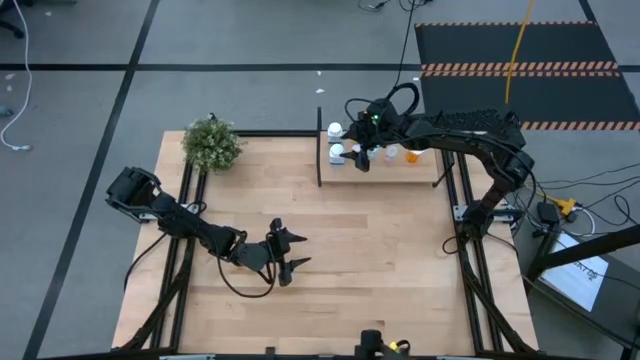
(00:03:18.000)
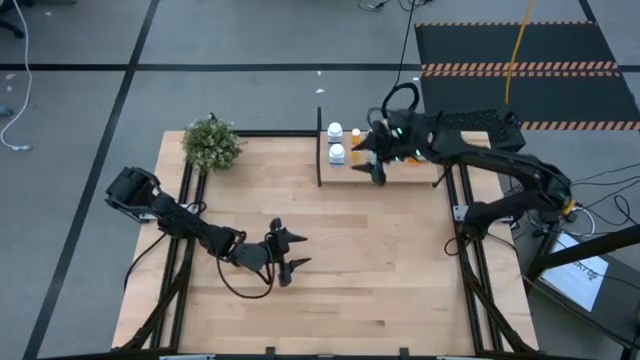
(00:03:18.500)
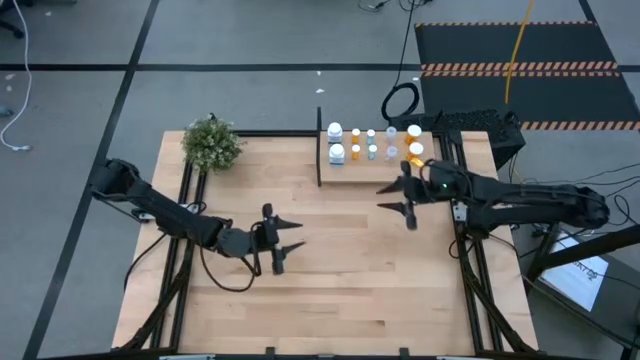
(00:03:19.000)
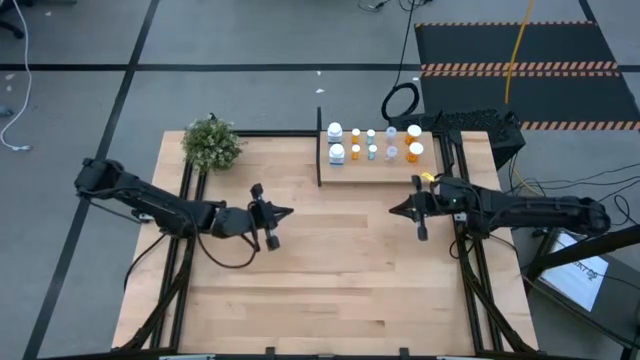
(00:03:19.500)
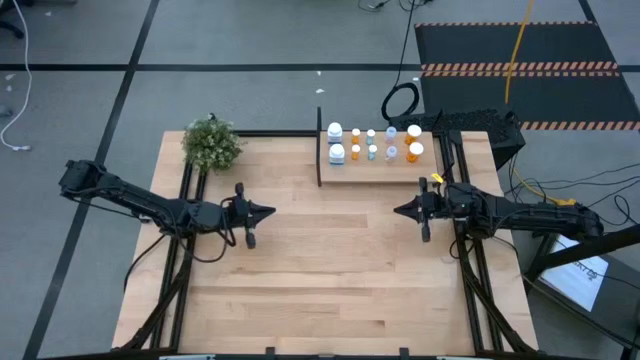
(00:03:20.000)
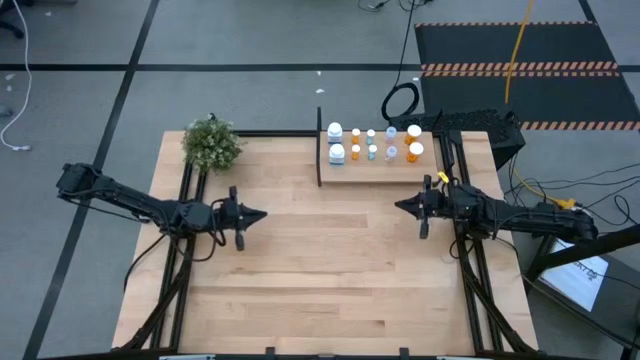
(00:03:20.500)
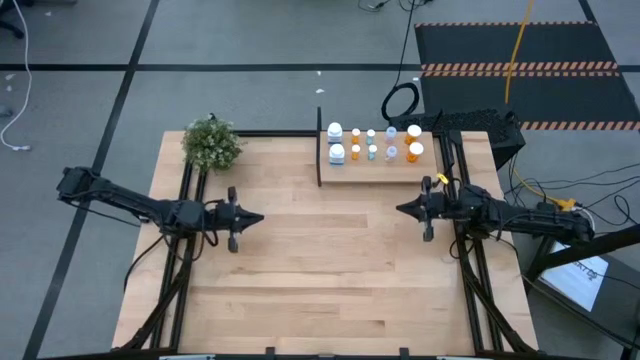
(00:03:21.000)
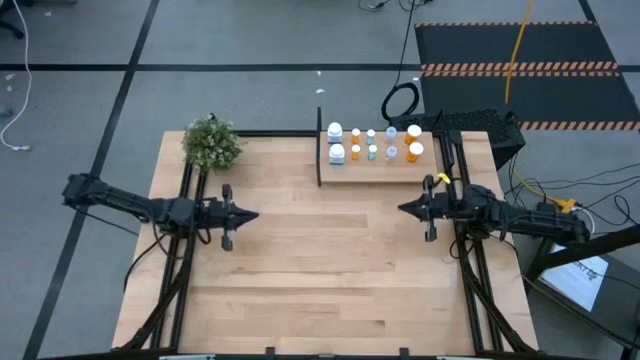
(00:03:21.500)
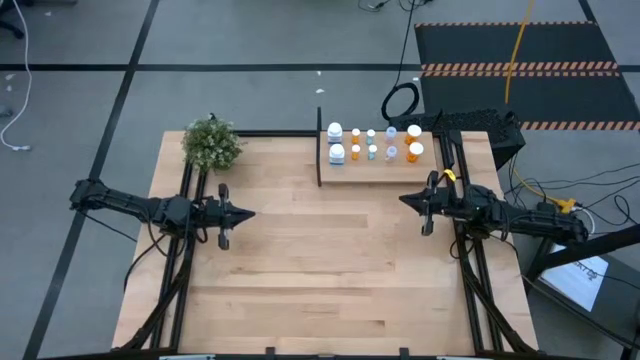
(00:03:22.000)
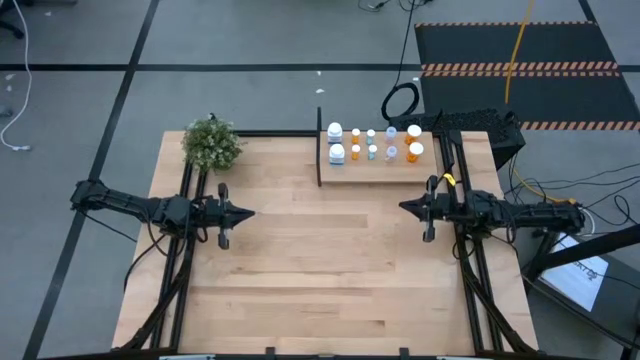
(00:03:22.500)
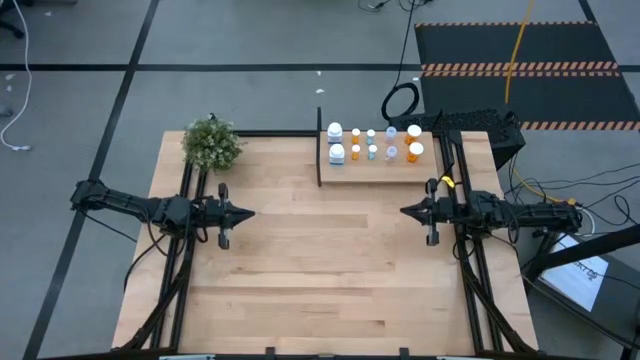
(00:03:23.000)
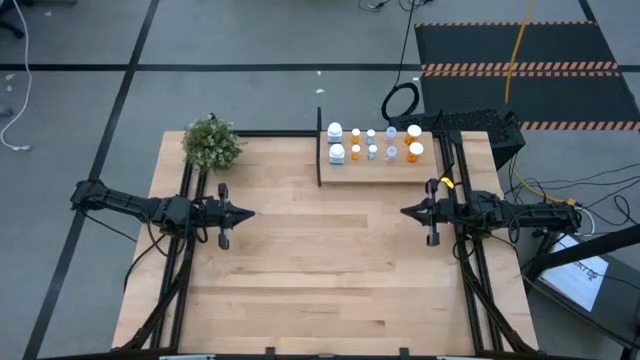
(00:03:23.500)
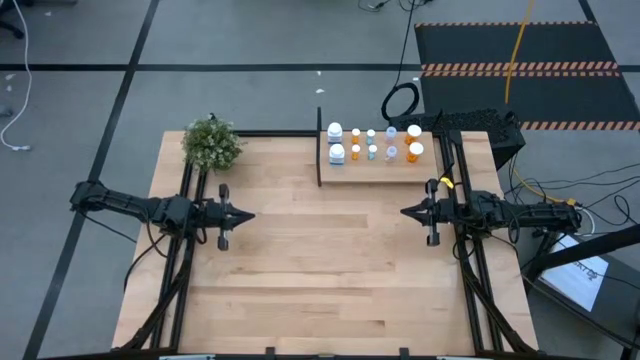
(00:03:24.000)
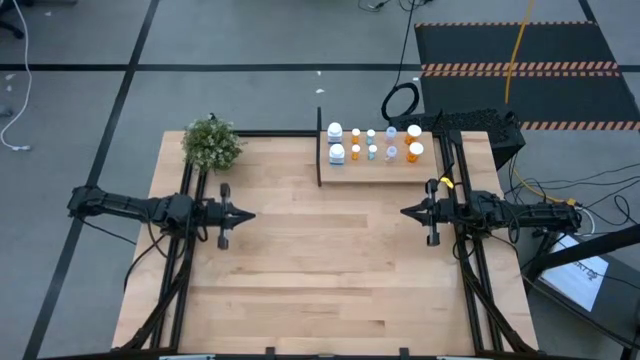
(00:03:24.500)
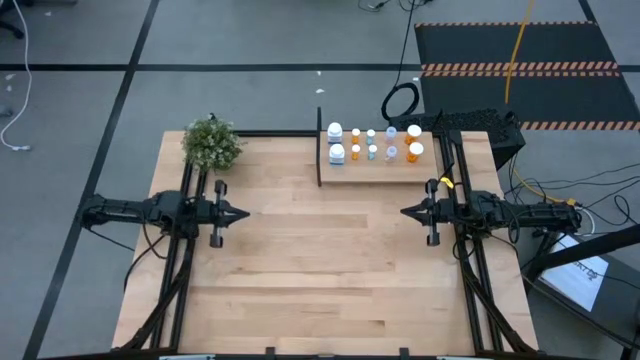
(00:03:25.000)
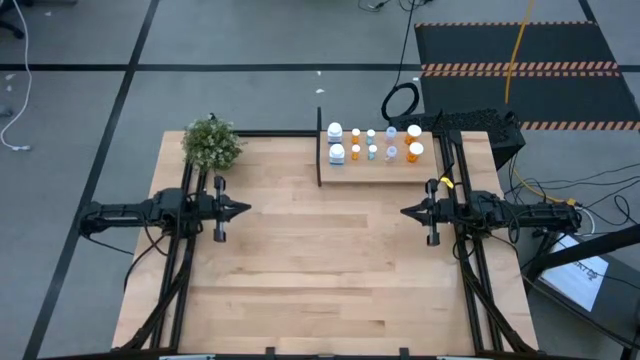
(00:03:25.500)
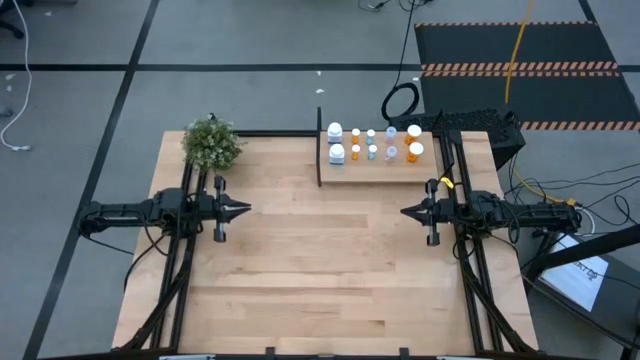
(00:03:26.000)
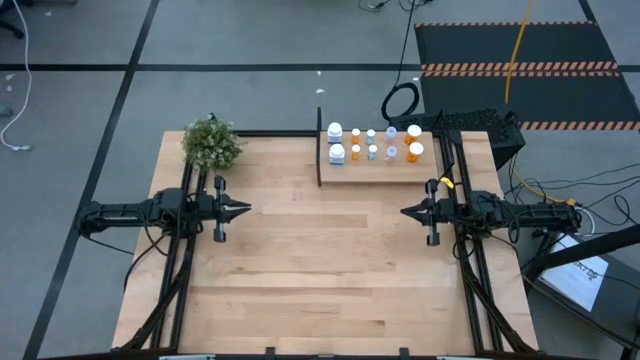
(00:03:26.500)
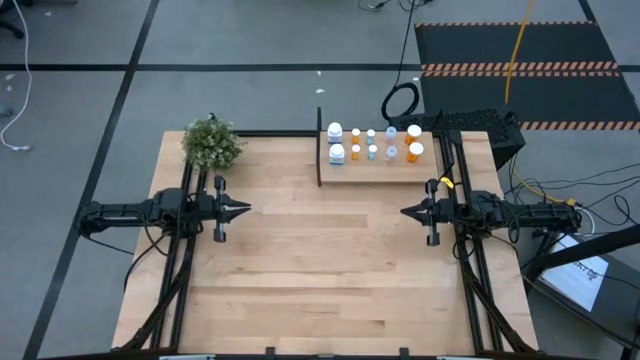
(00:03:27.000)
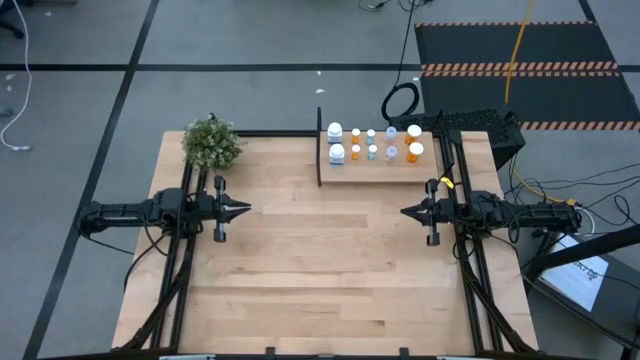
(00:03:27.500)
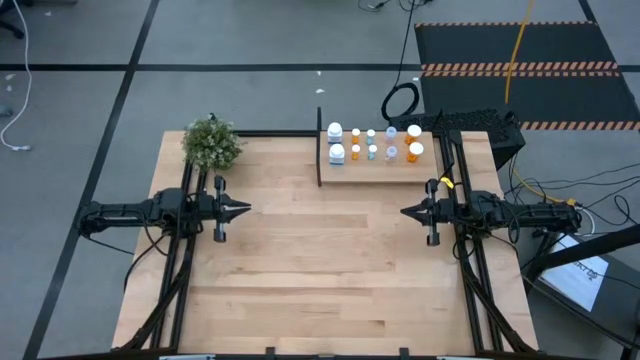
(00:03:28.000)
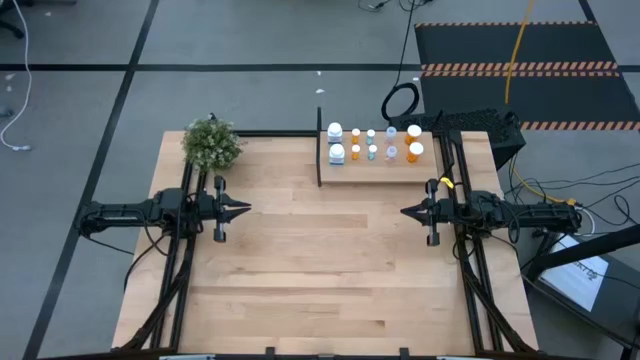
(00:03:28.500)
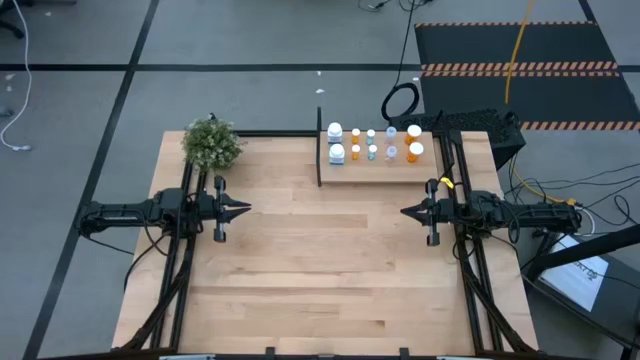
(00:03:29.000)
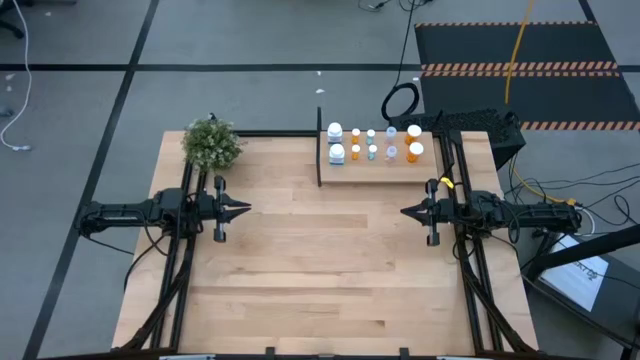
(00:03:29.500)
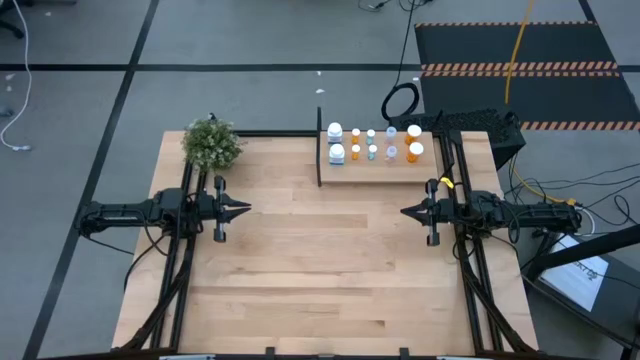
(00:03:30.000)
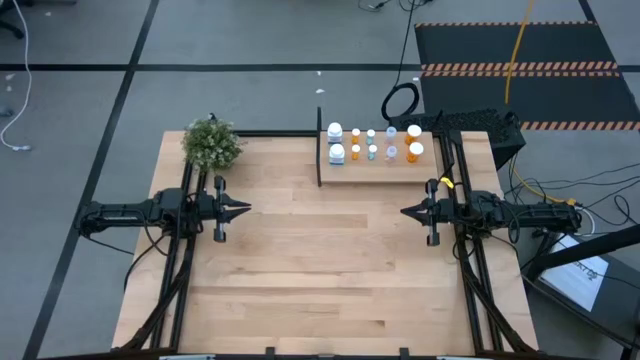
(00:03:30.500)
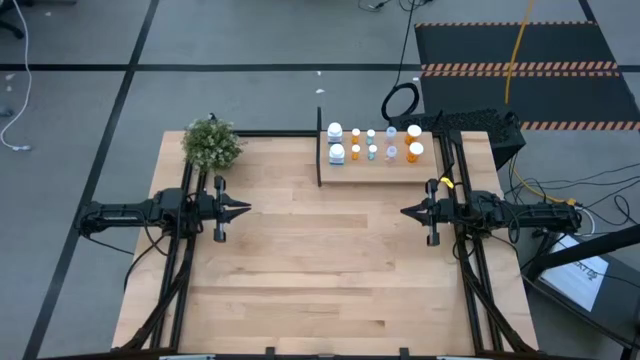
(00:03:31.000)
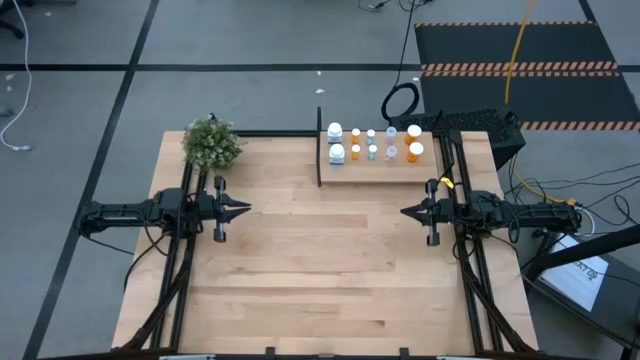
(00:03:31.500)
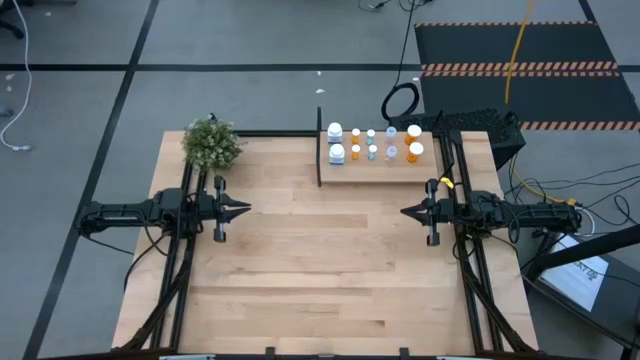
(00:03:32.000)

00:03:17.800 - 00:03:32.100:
Task: Pick and place medicine bottles onto shelf by color
Return to Home Position
